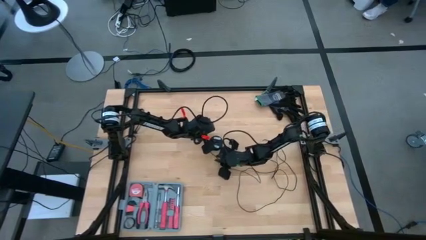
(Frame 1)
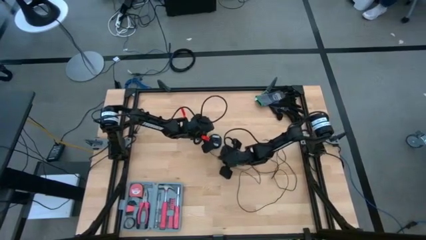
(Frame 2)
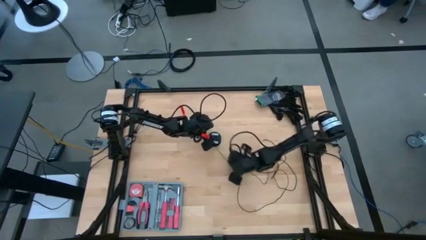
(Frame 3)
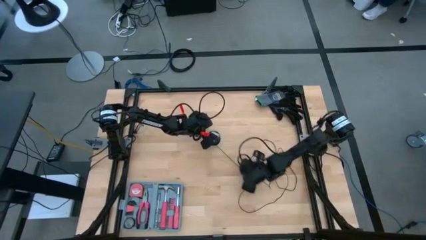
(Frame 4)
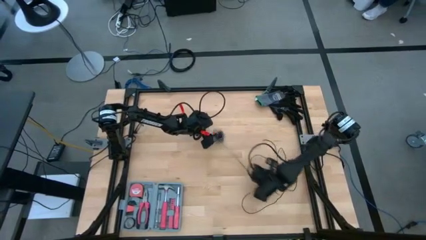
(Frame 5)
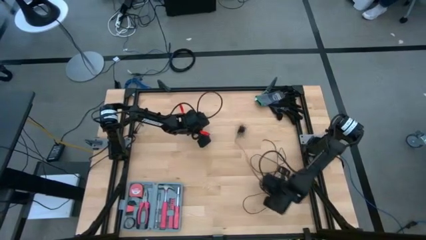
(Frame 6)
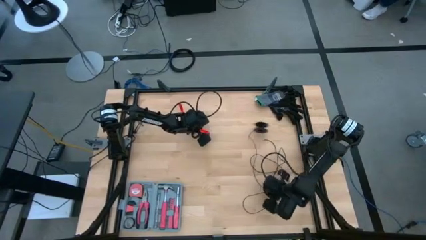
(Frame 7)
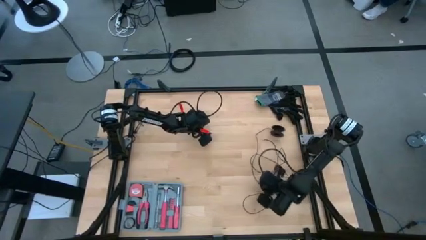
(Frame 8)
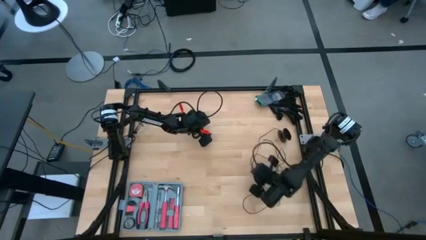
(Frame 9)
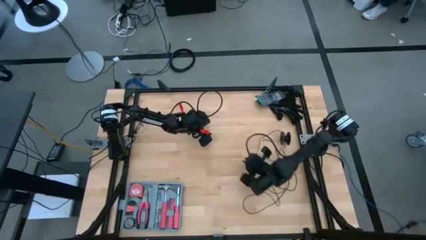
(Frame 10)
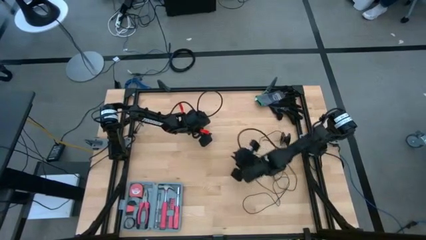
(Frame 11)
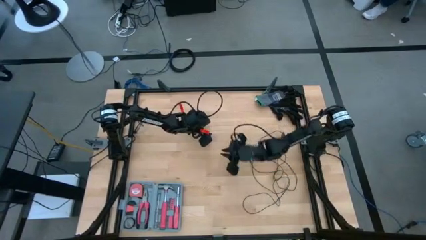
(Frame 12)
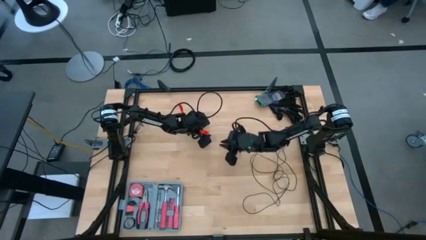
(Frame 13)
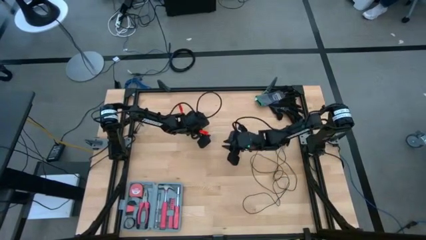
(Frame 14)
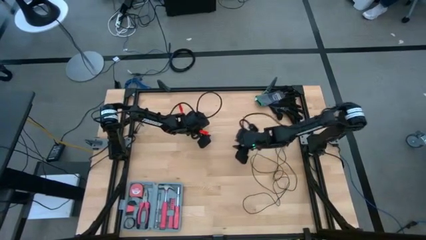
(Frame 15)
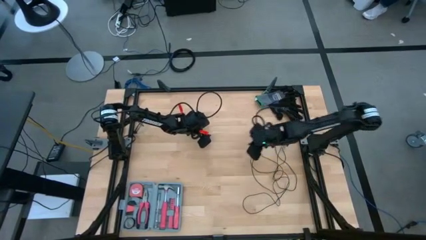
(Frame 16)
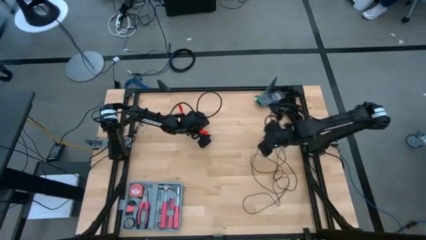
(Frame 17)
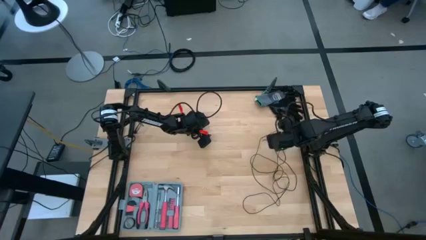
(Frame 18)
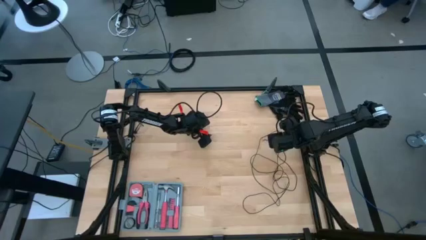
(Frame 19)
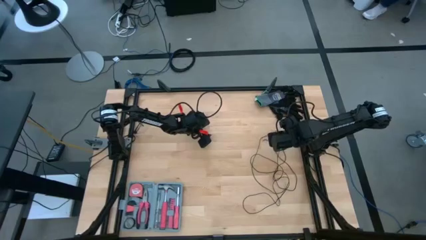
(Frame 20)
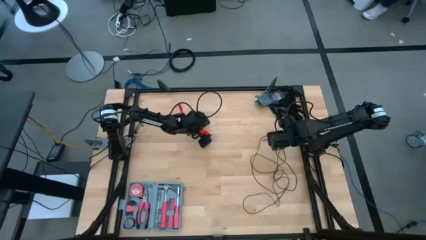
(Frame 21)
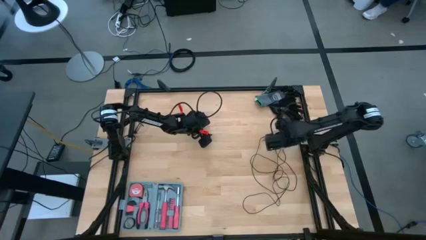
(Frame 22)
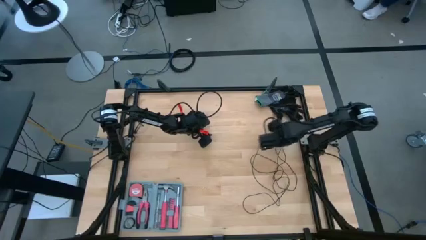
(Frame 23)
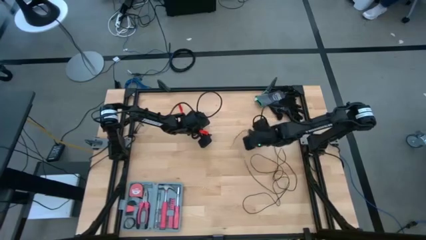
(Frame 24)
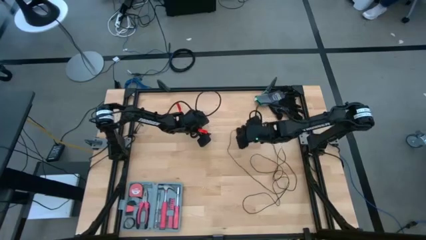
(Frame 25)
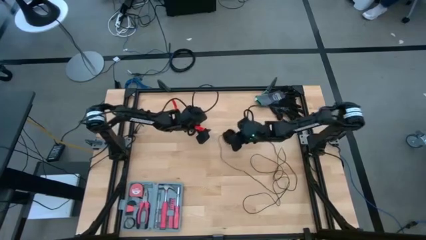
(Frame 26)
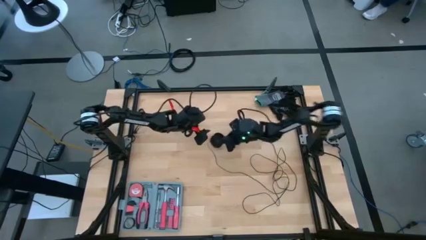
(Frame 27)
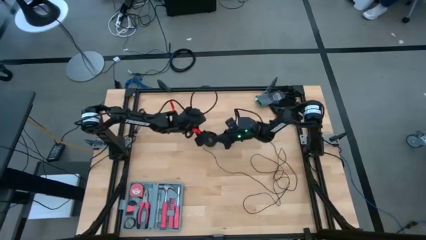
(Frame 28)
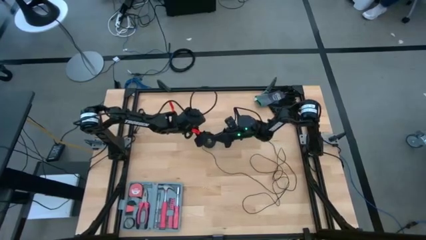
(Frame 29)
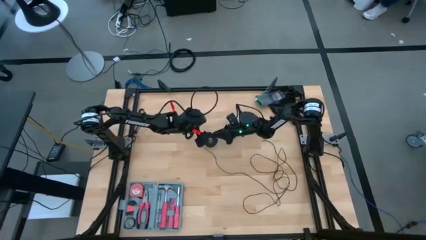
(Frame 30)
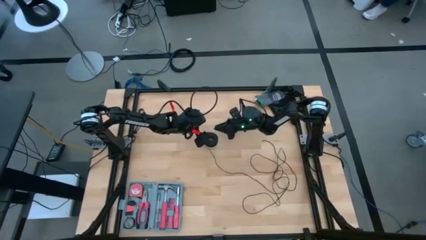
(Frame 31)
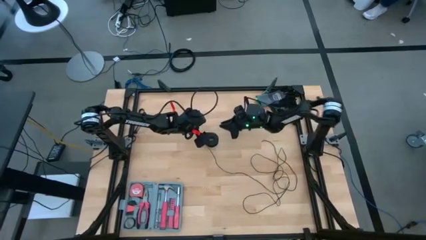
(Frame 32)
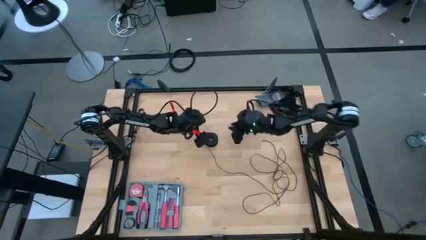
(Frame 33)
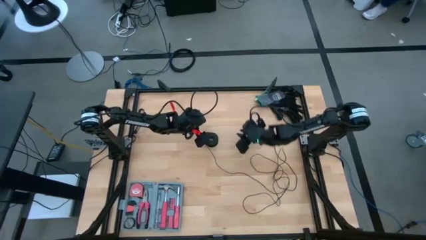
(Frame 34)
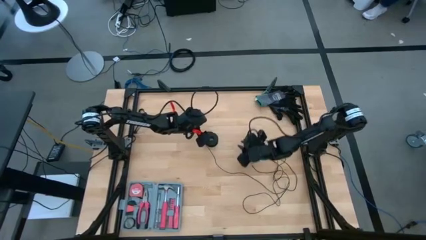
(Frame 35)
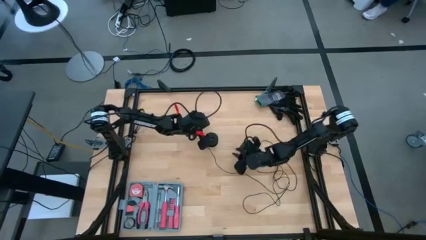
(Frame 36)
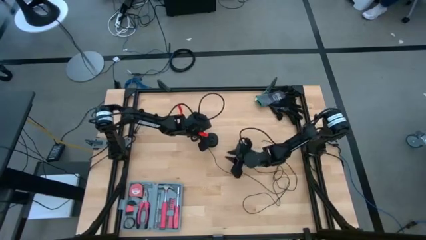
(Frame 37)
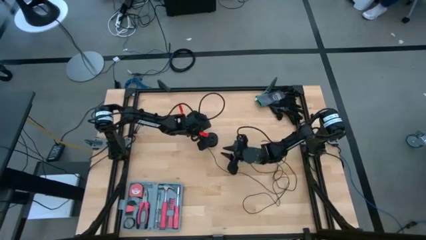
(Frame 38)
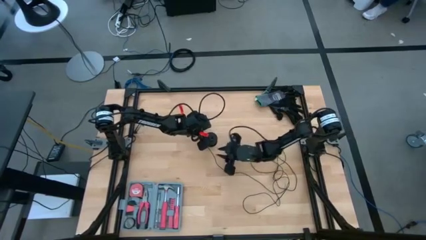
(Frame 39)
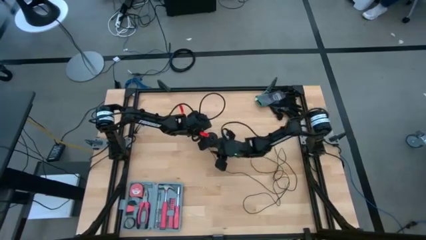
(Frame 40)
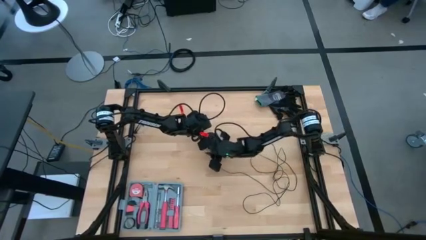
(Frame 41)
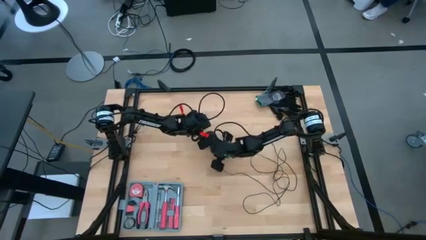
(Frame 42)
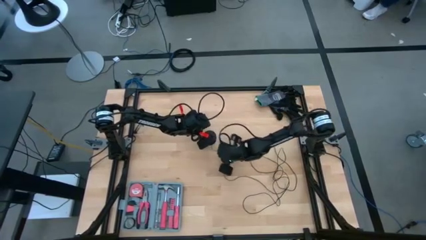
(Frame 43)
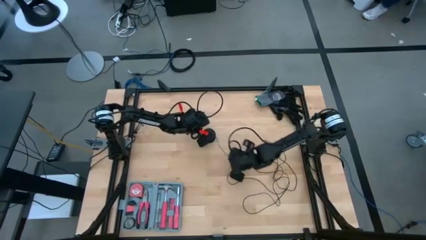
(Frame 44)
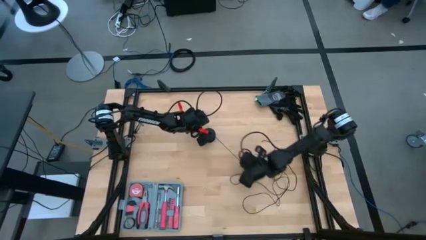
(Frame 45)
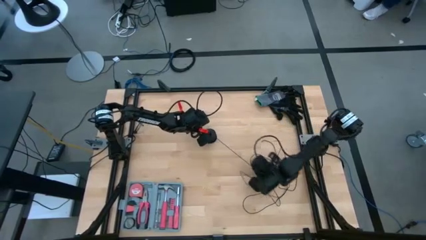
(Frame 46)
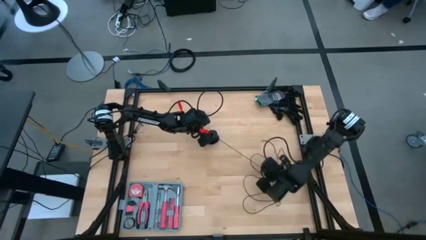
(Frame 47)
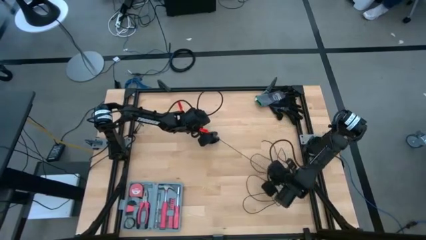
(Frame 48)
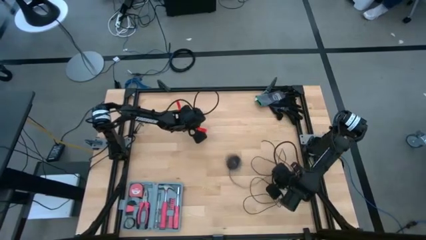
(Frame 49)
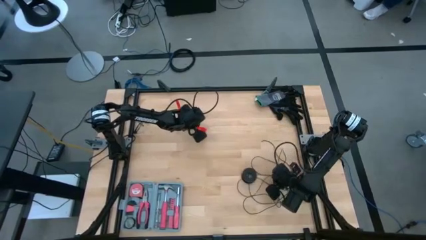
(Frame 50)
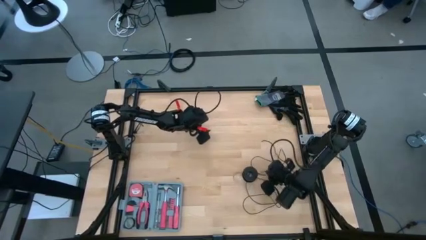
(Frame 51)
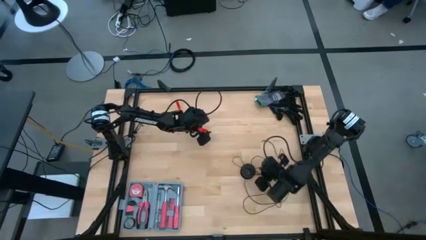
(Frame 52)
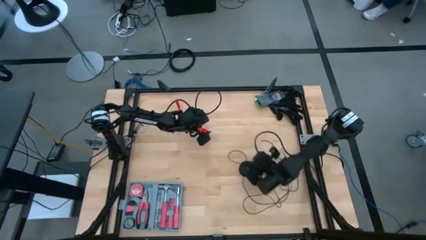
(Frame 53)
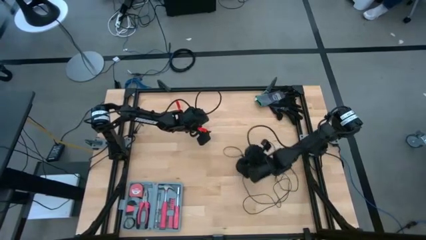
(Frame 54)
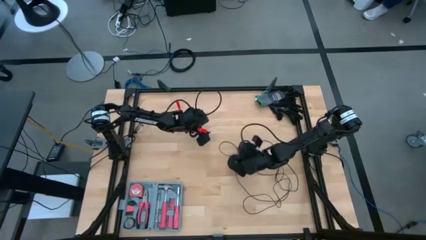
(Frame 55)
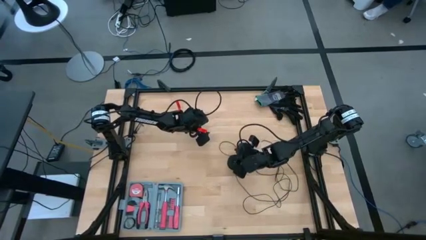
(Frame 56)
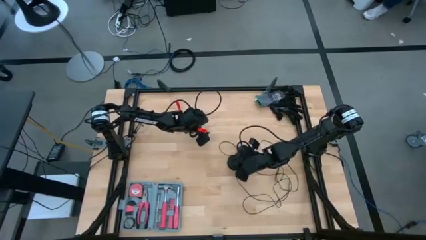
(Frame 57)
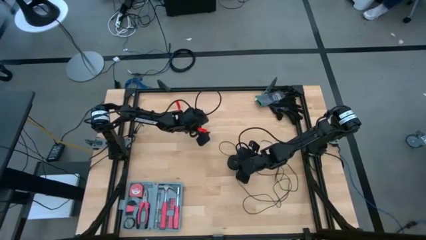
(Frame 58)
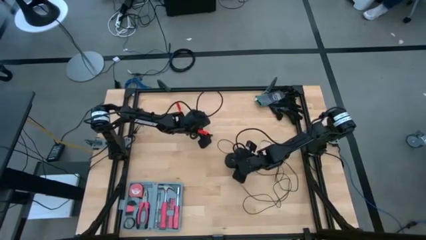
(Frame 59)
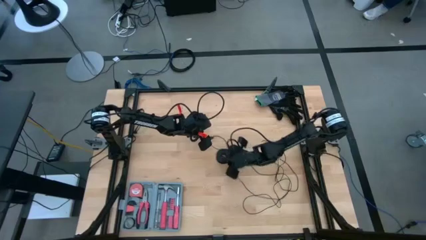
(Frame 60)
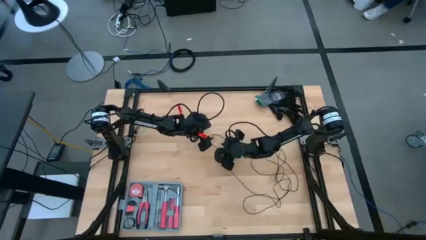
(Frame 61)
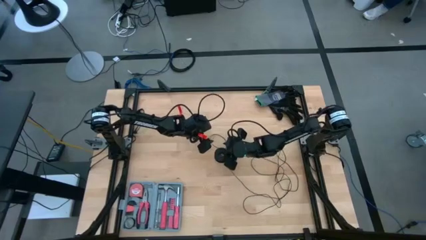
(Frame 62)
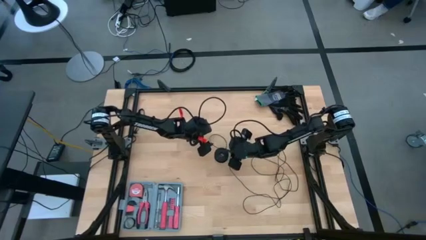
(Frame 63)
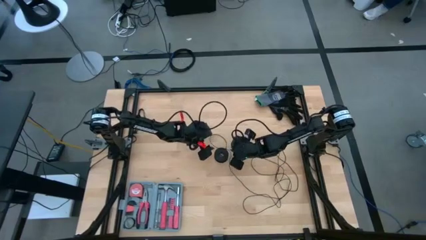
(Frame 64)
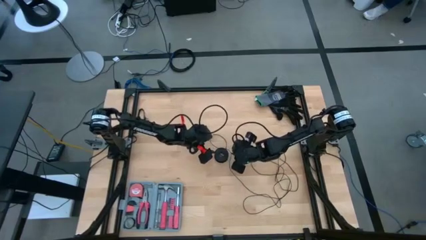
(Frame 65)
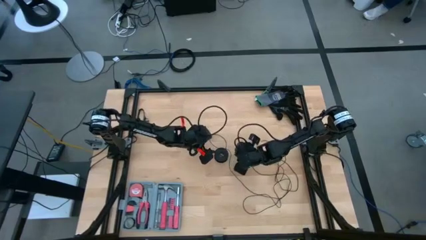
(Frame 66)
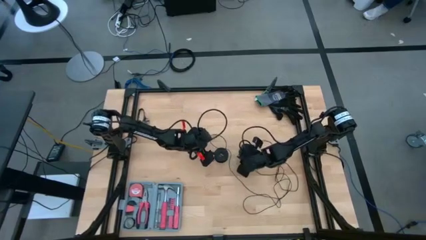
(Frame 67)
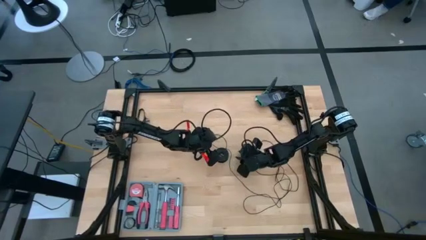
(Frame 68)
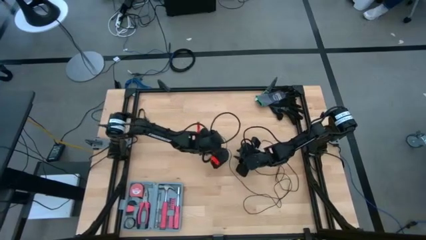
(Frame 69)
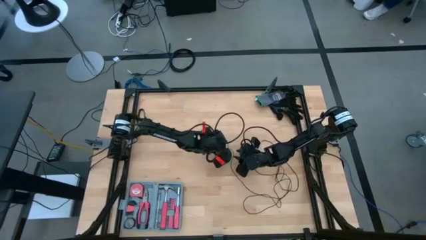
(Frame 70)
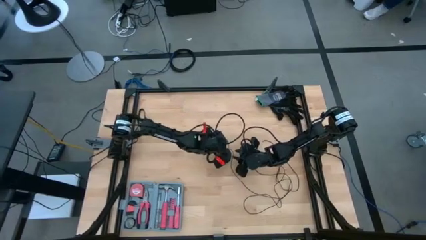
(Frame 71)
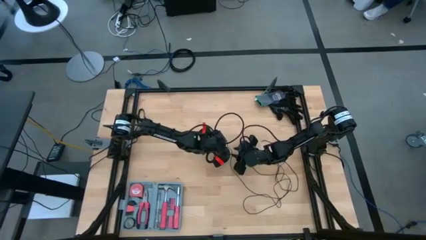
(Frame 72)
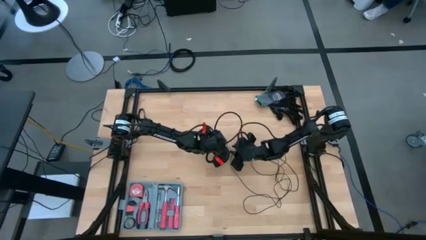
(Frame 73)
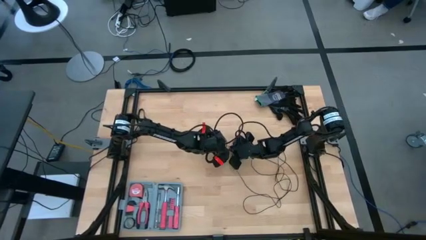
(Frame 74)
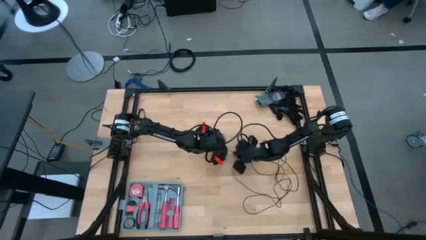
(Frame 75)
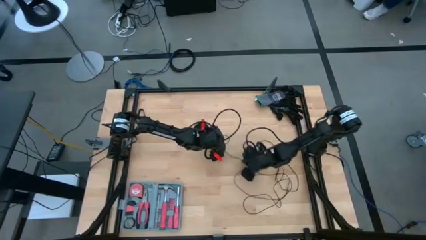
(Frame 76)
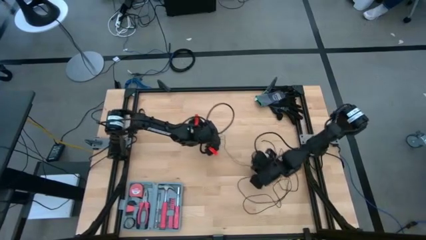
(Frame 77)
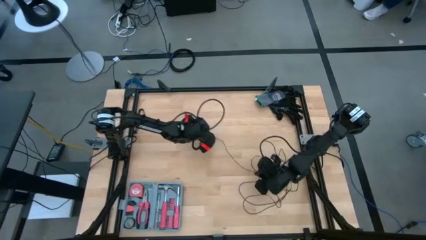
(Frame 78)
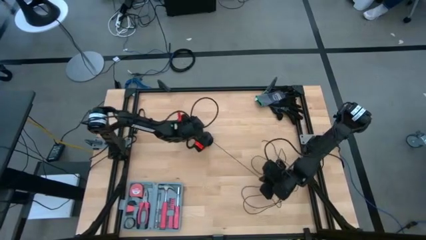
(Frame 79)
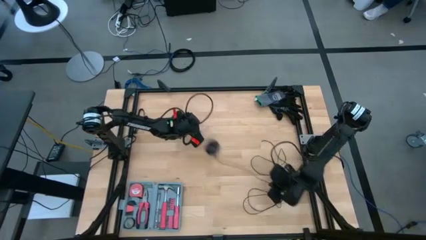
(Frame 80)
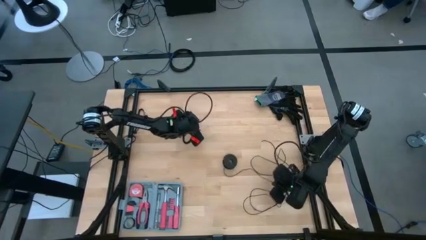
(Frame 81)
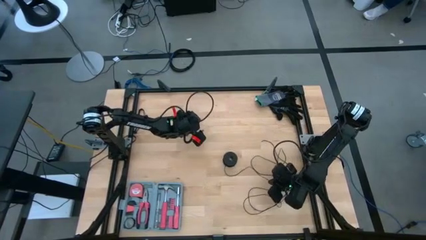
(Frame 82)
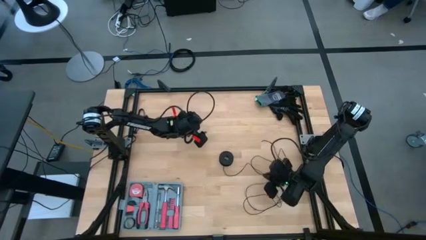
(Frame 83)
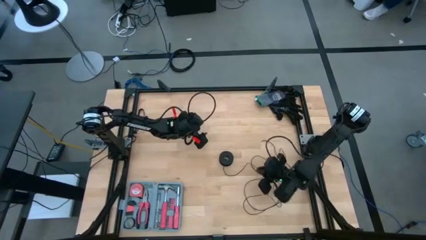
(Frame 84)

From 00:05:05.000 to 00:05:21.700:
Task: Coil cords
Uncoil the black wire from the spool
